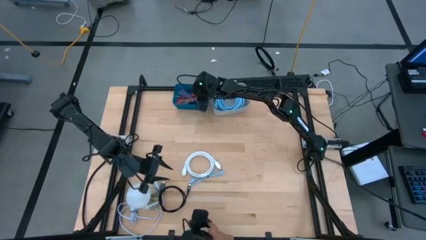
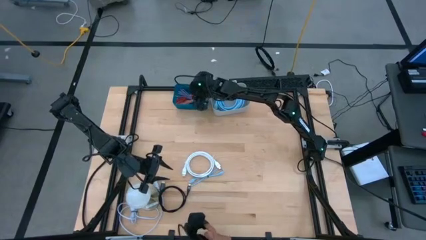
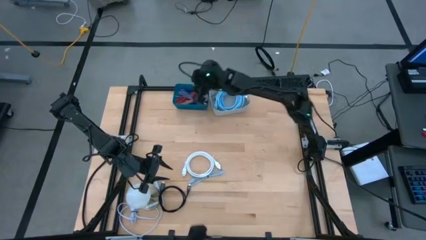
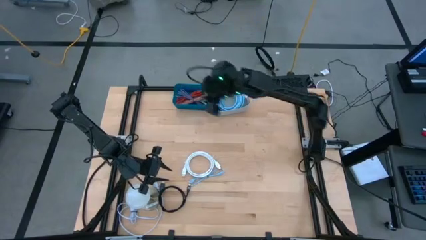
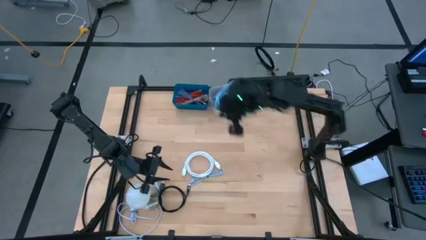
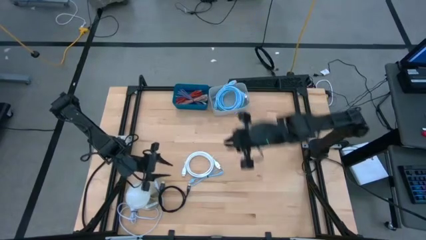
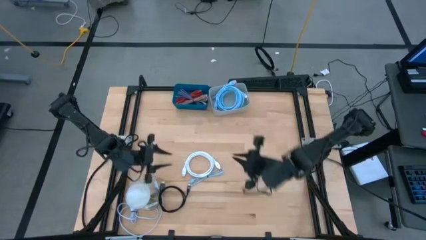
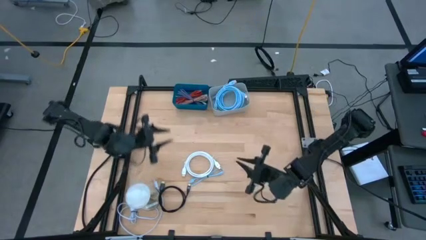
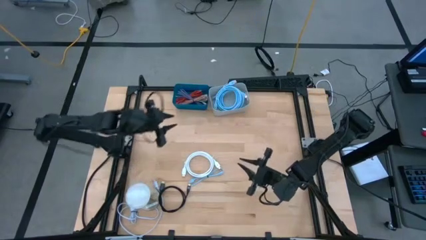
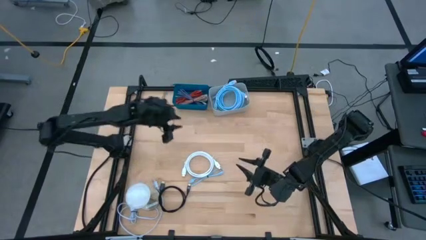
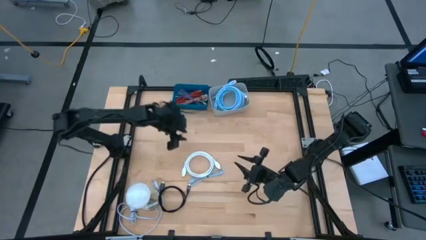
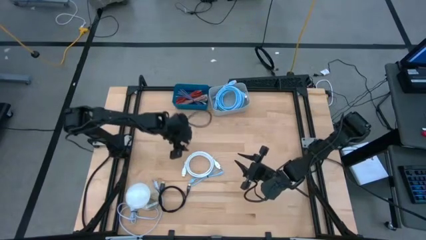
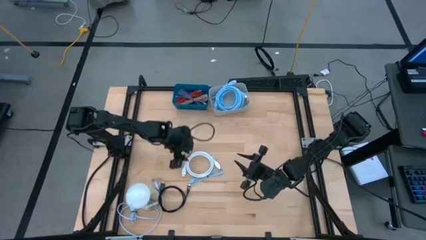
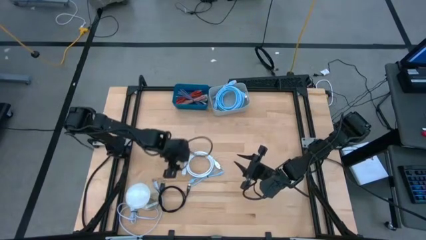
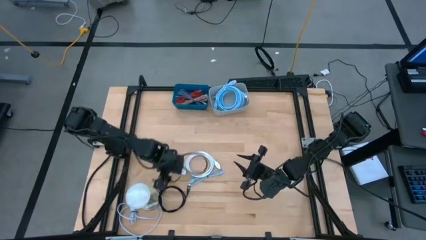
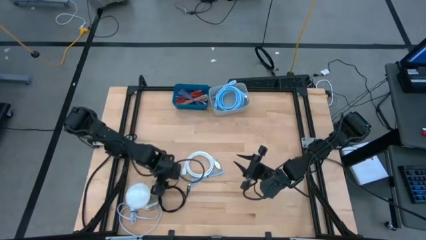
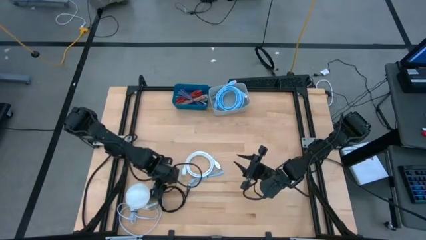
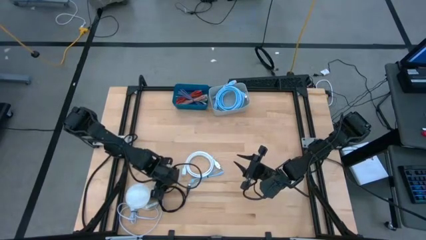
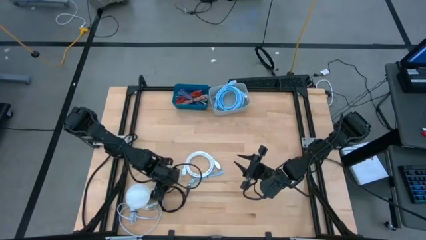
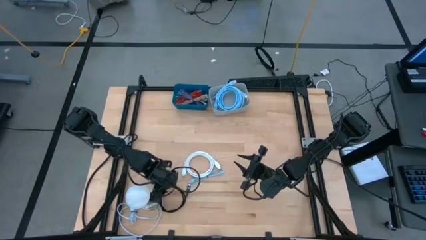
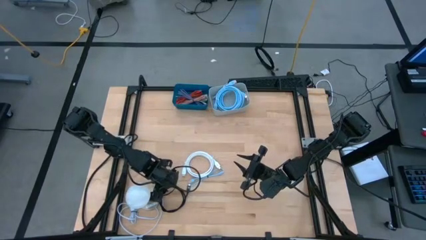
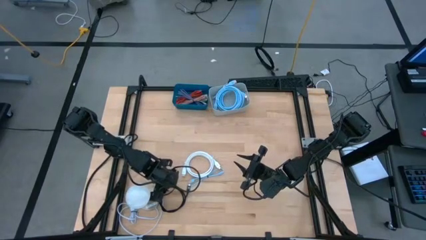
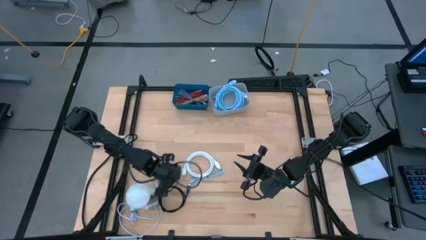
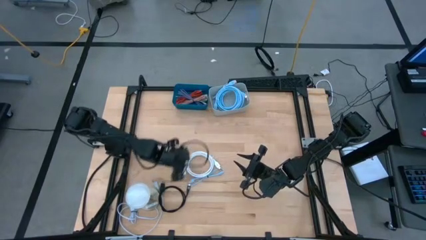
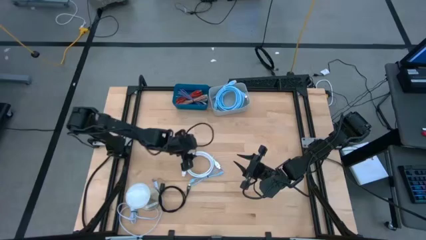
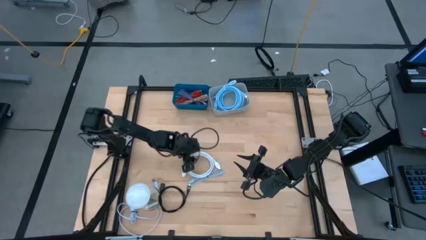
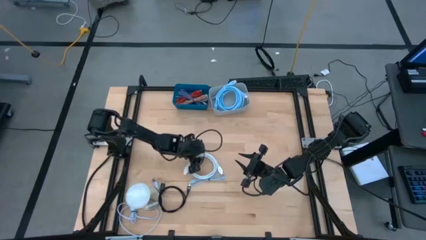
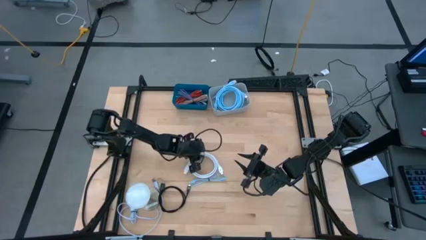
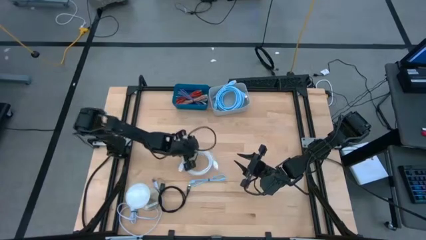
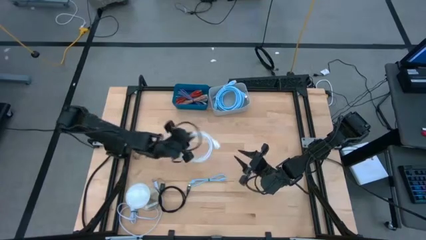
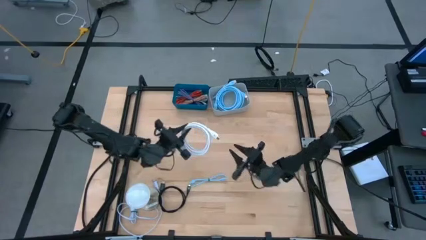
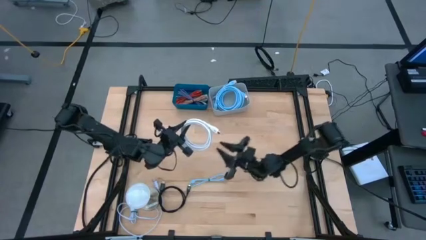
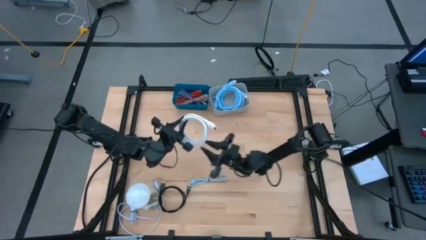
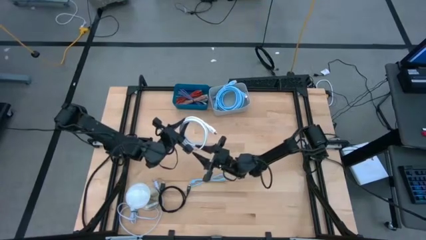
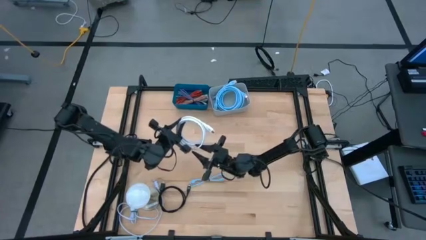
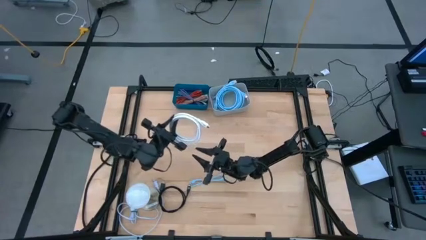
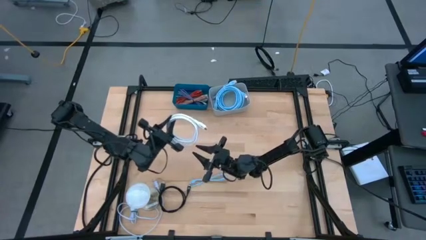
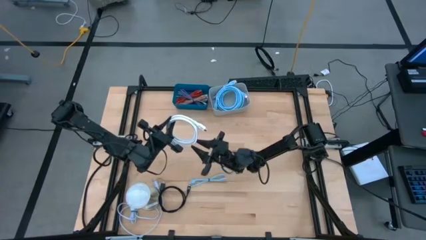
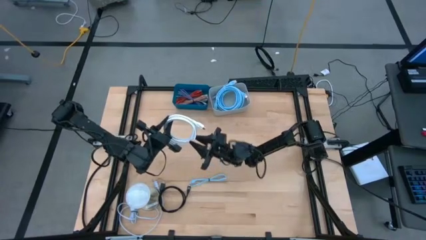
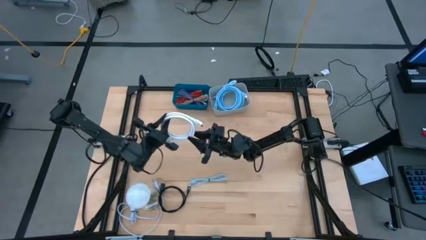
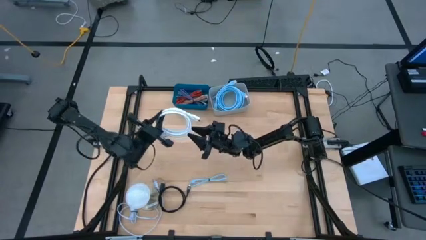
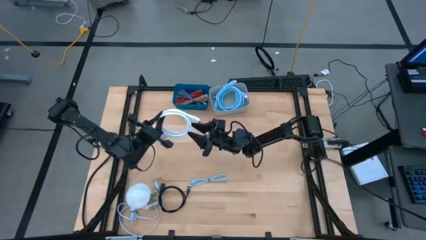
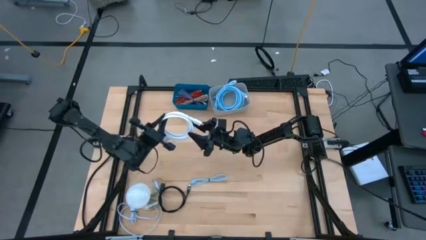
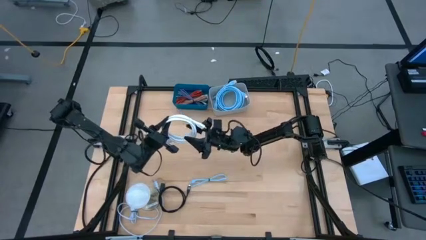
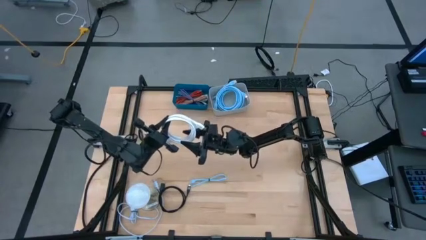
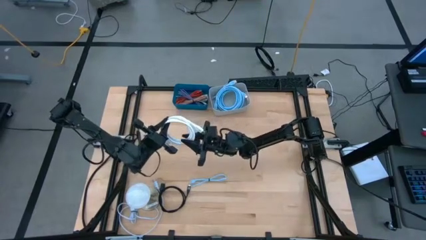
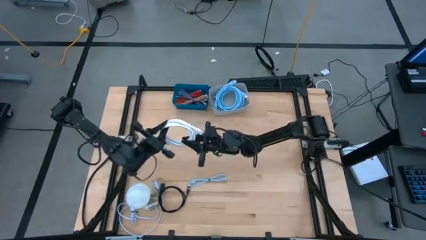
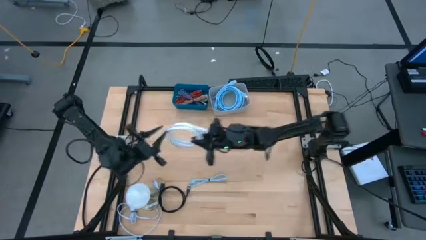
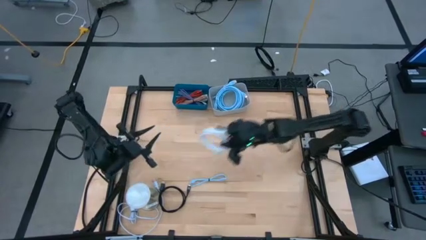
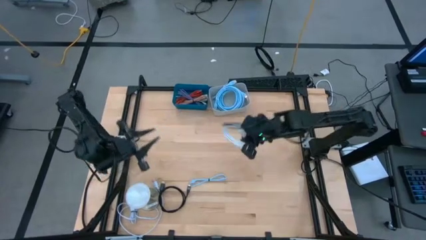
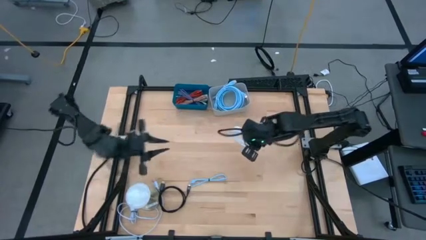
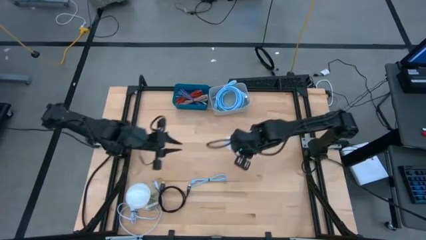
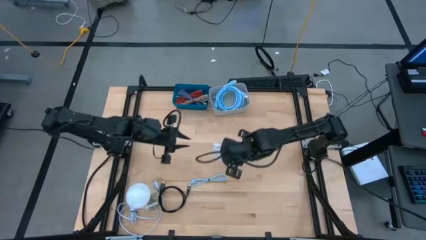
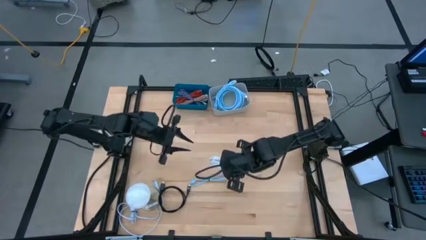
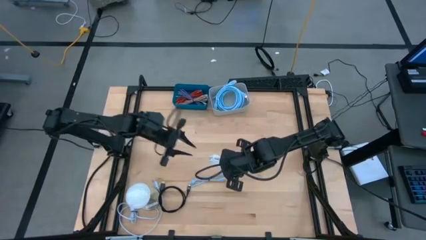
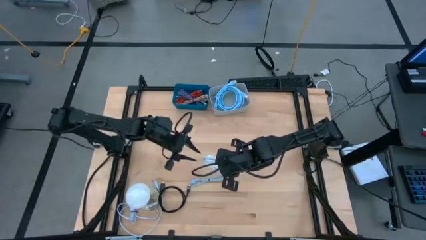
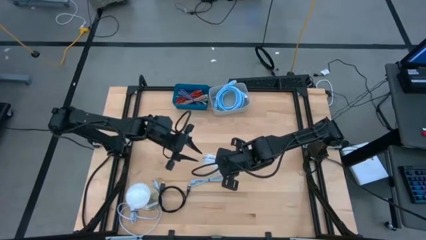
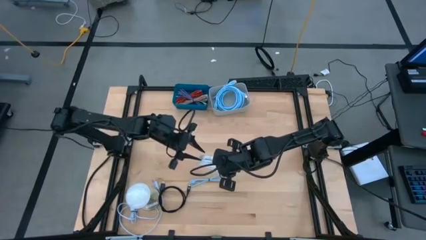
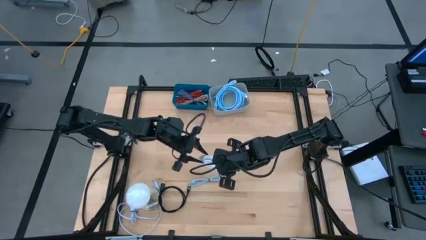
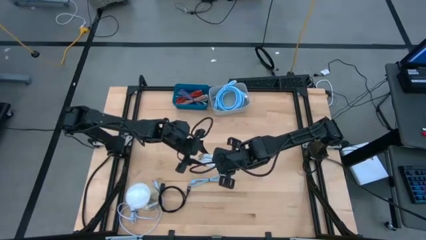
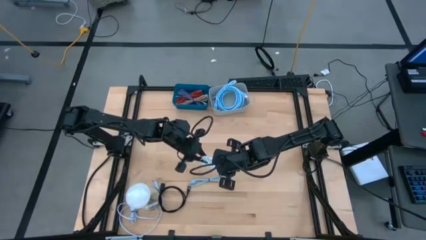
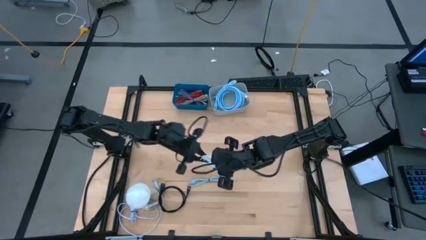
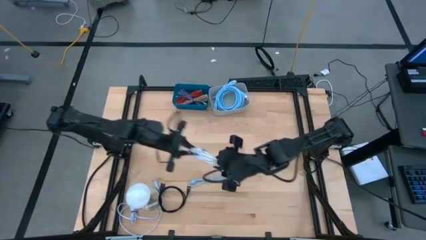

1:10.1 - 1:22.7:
Task: Pick & Place USB Port
Put the white hdmi cable into the gray bin

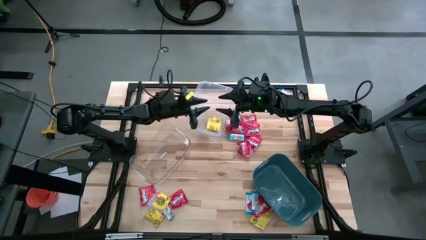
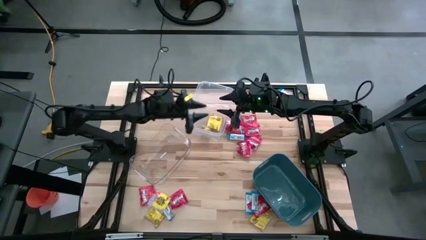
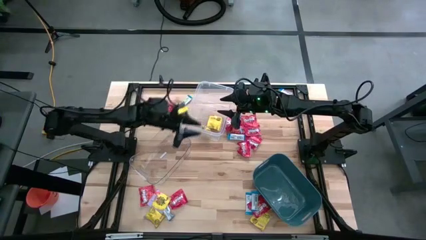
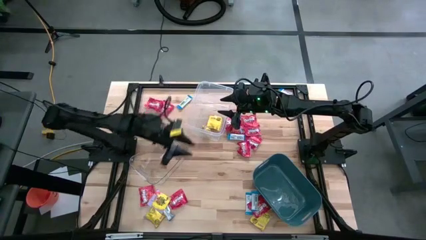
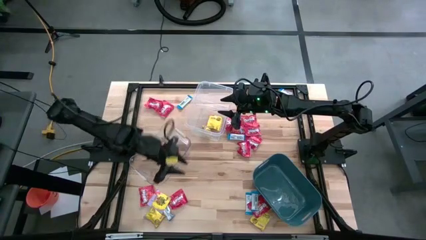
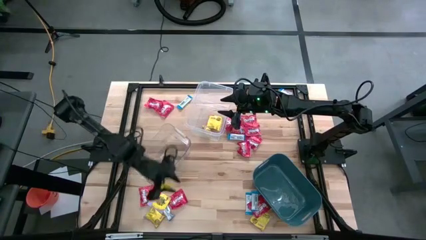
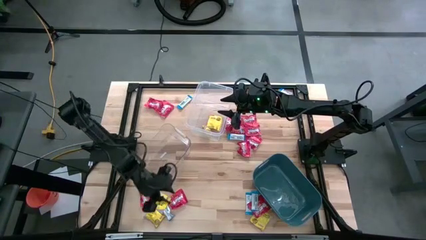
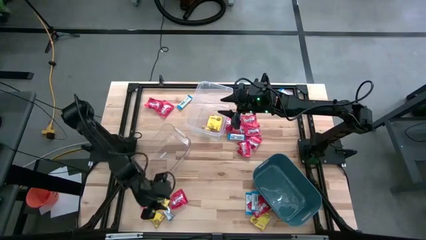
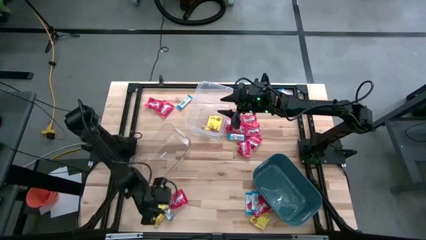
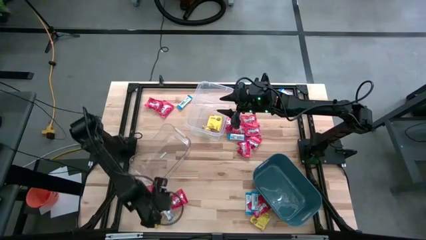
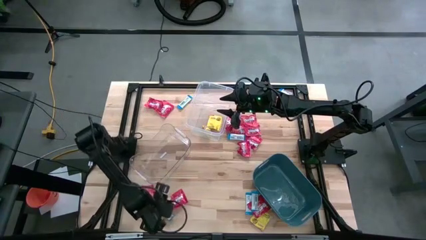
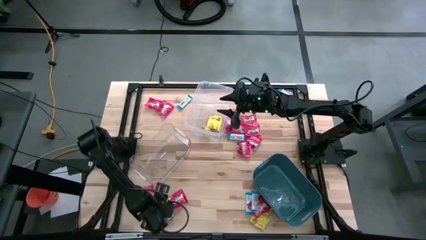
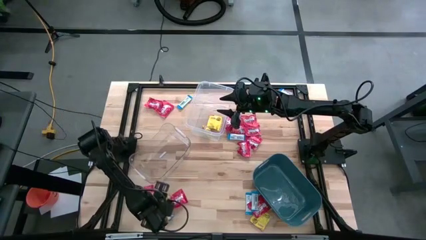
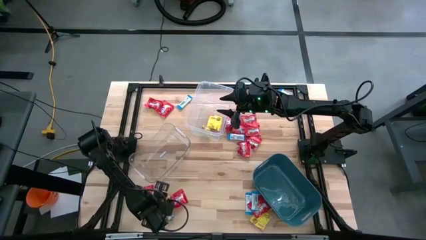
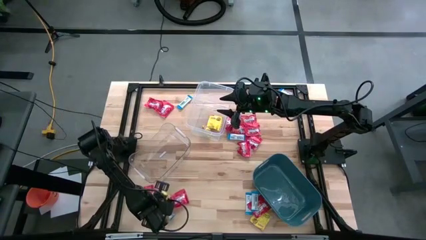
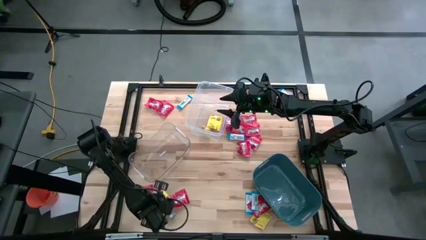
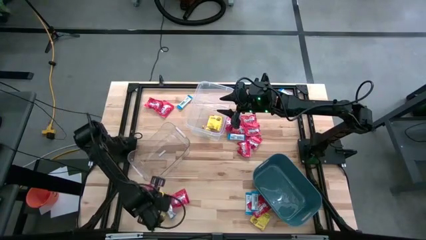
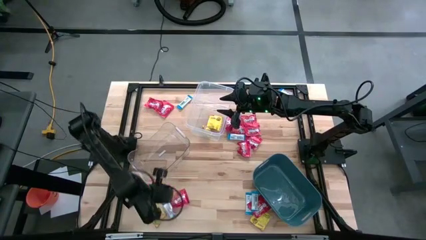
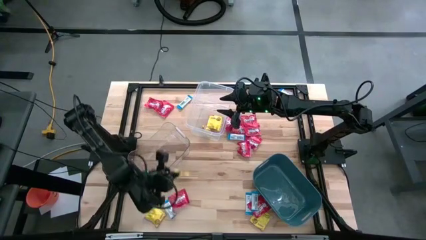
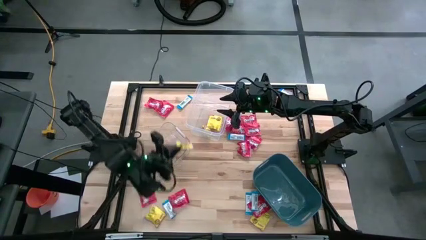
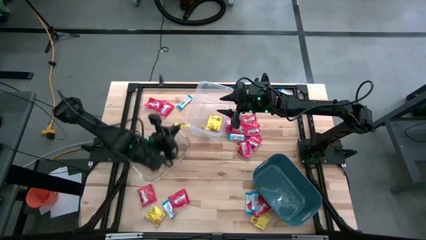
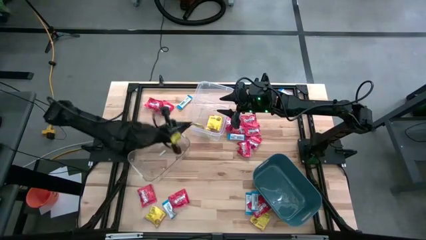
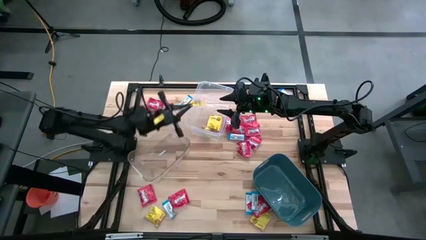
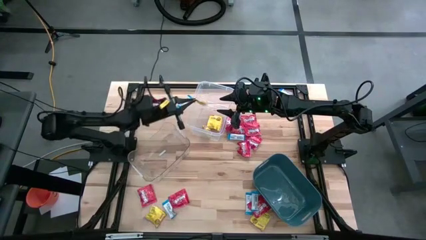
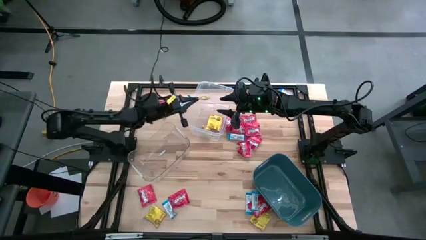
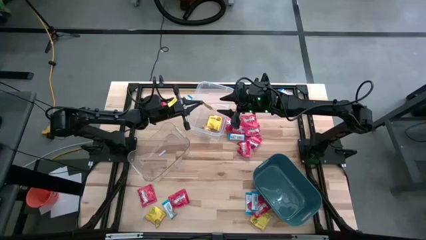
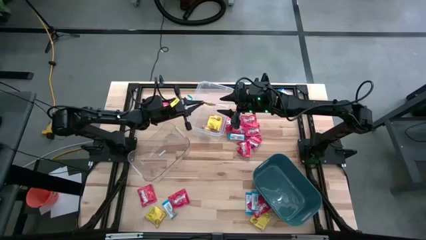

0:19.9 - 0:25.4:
Task: Sort candy
Put the yellow candy into the transparent container
